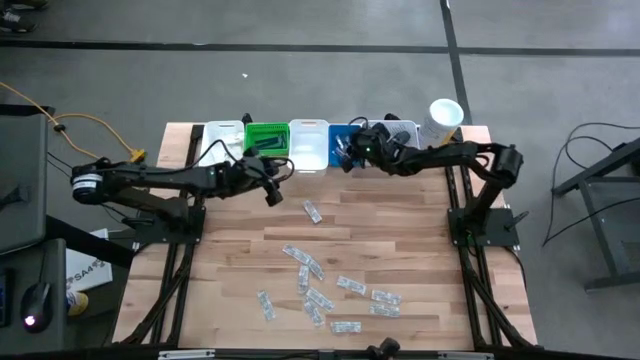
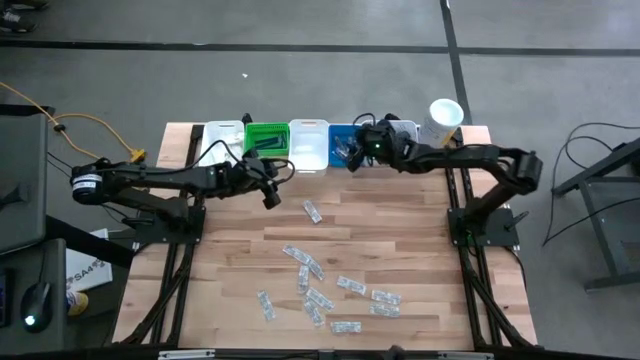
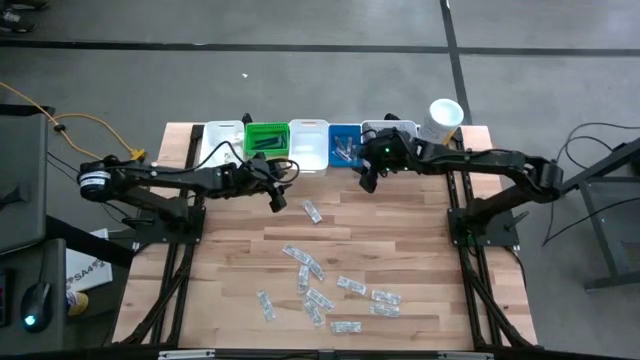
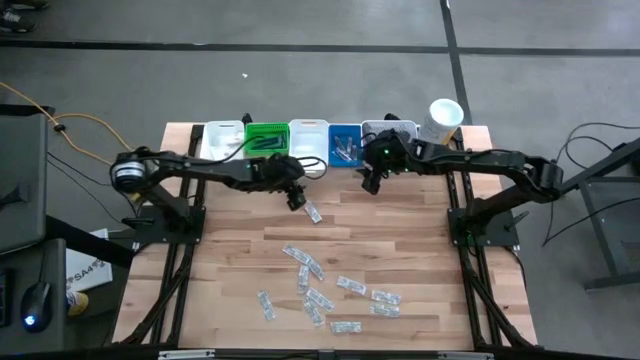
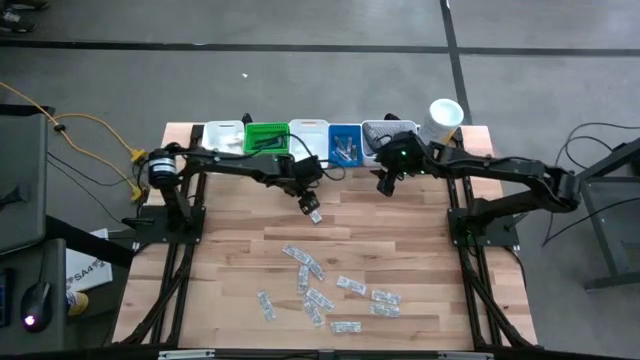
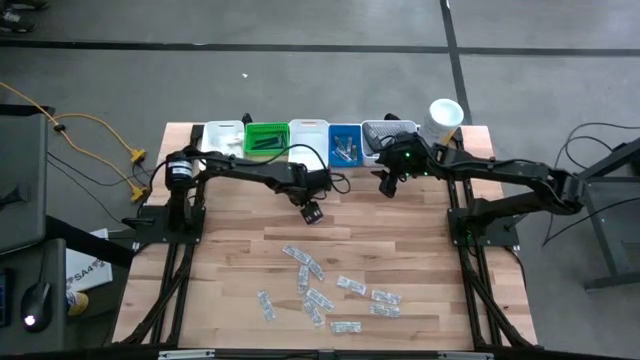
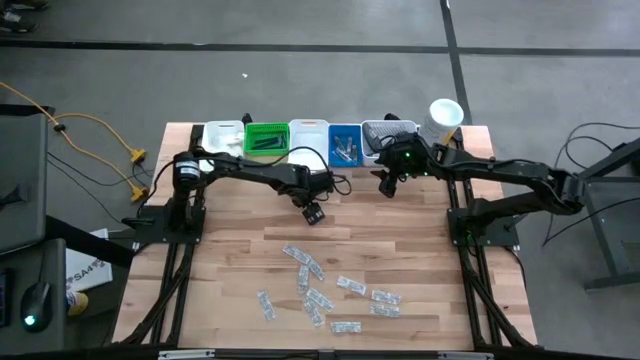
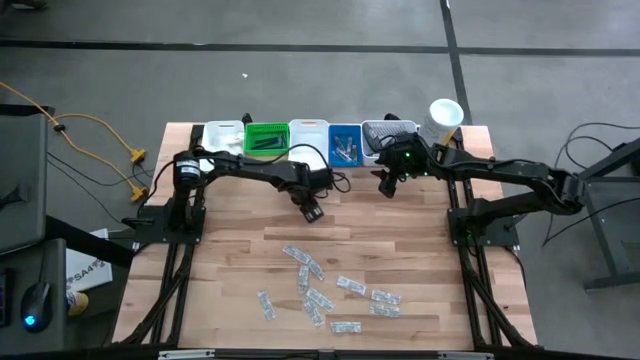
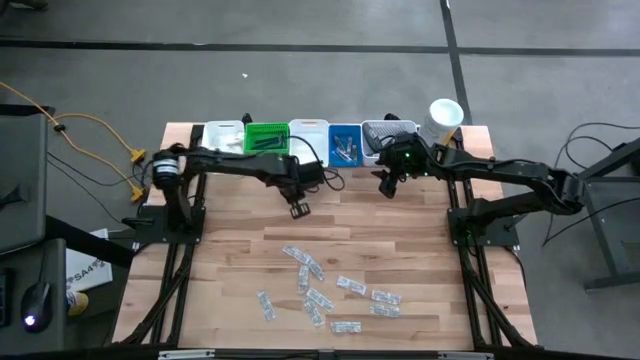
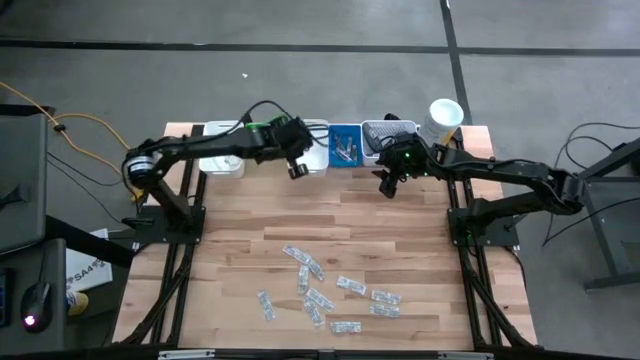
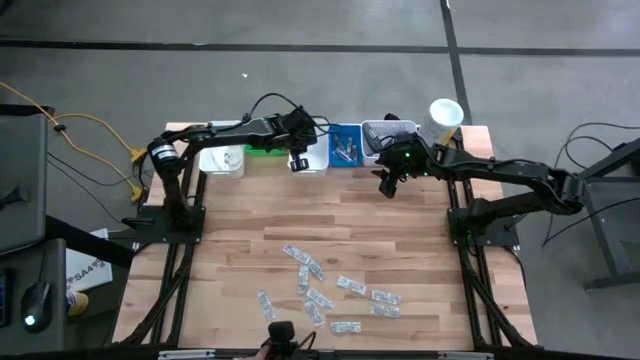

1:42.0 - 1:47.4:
Task: Pick & Place Travel size toiletries
Put the white bandage into the middle white bin

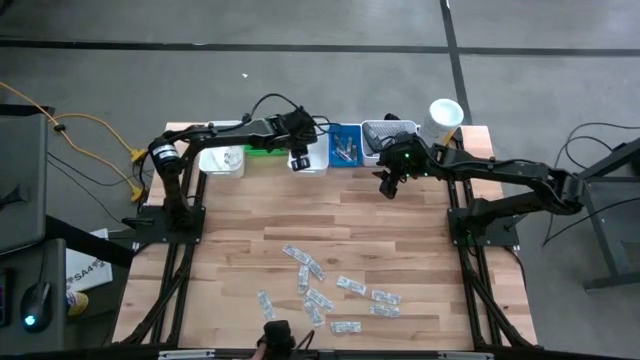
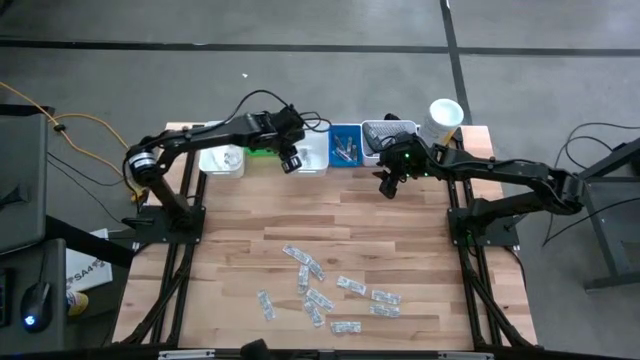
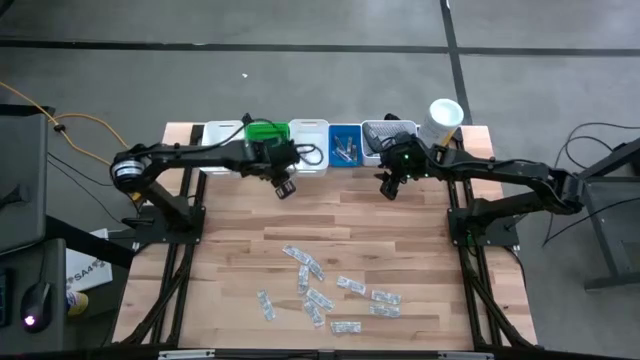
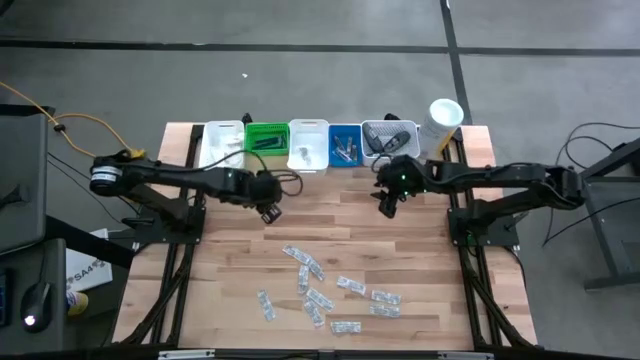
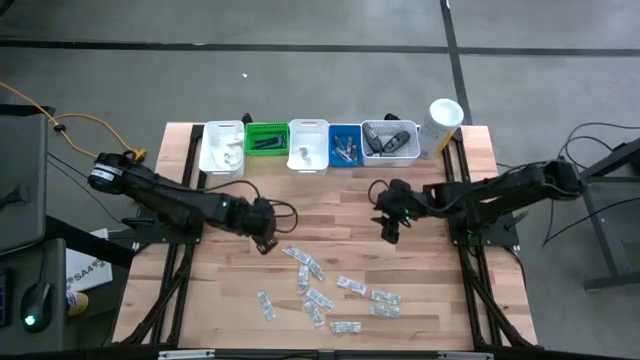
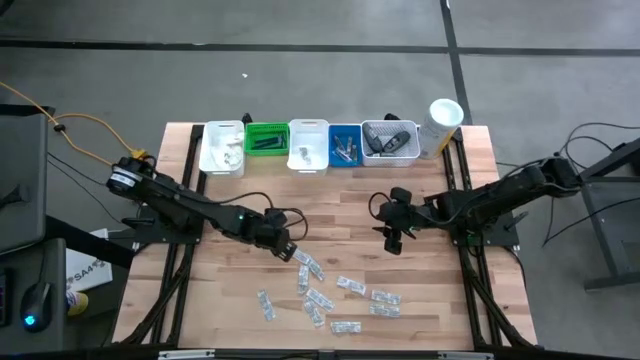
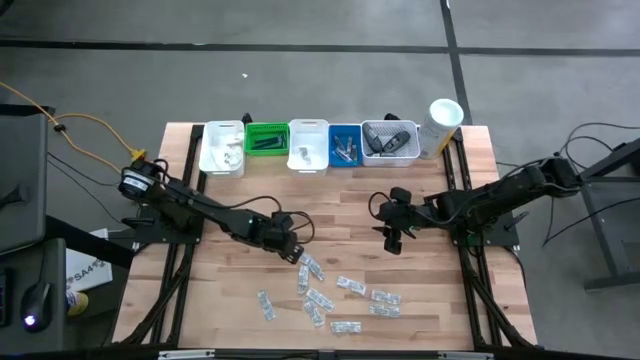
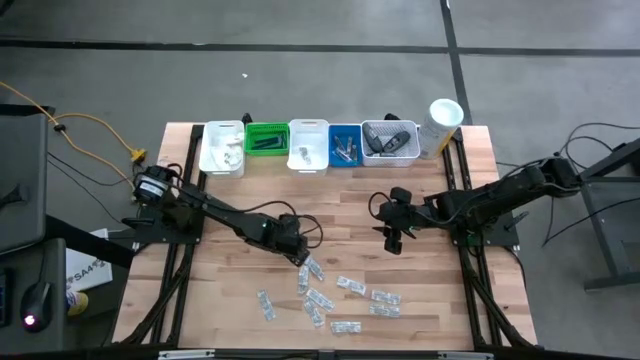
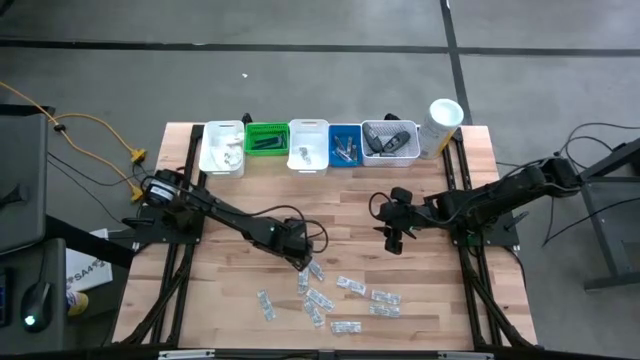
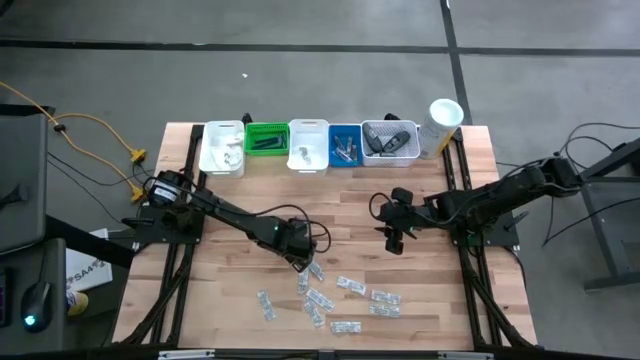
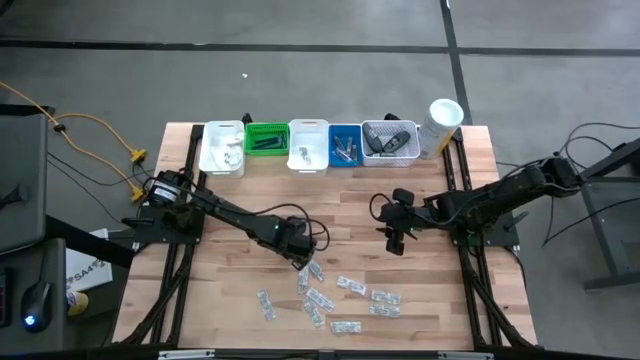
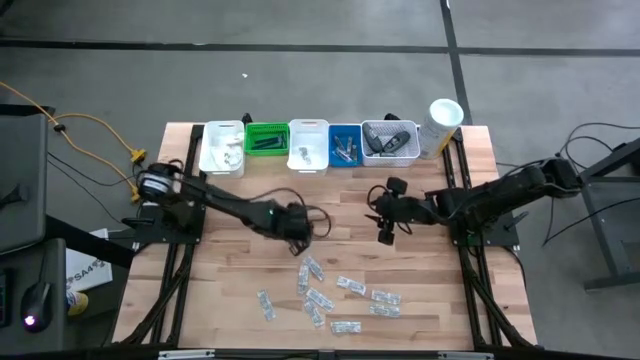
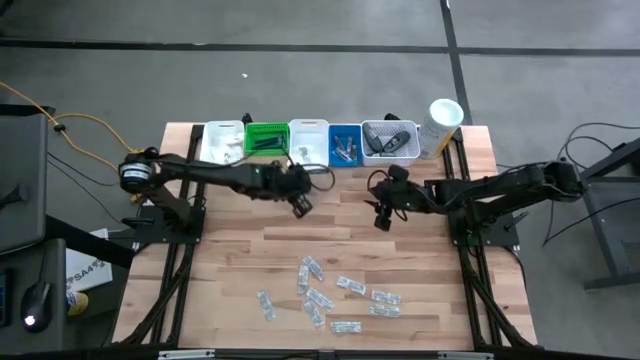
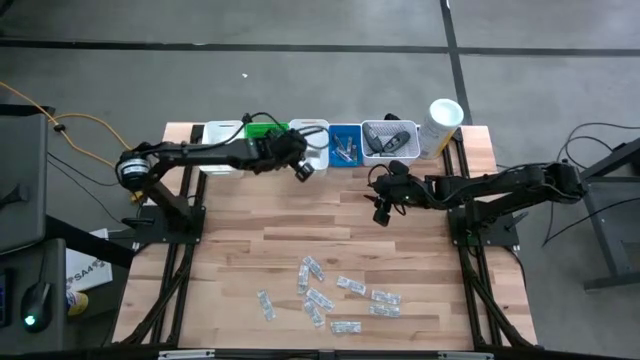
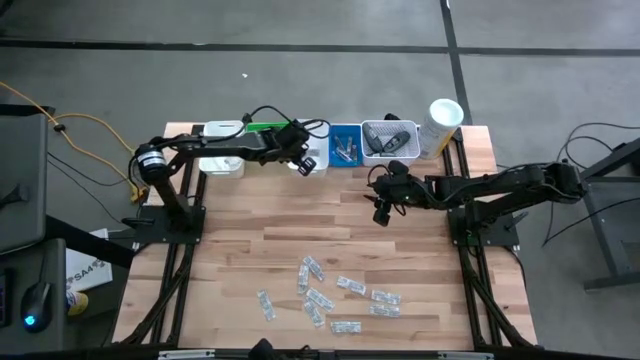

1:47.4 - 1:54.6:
Put the white bandage into the middle white bin

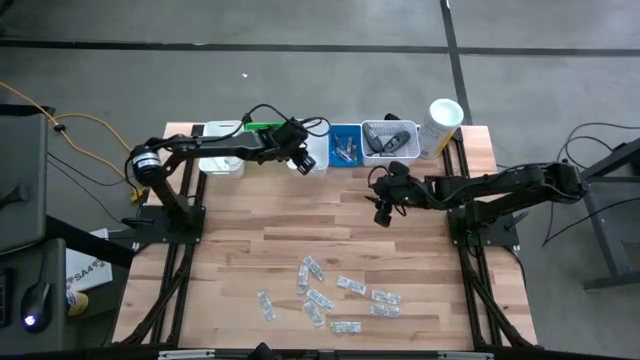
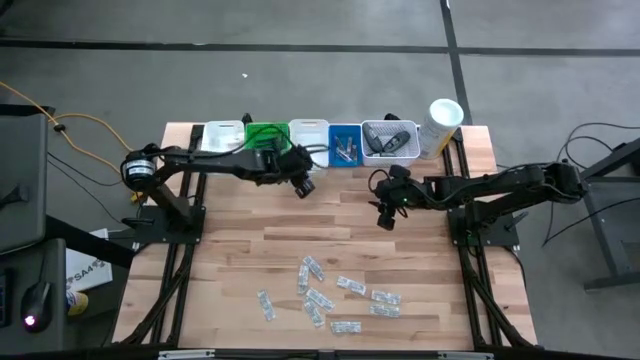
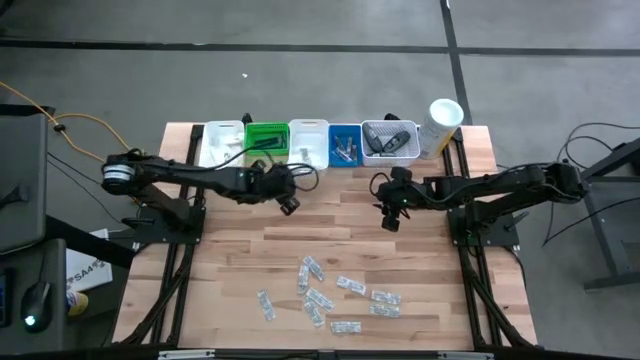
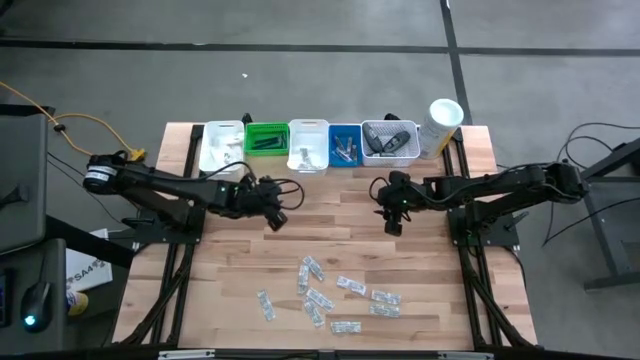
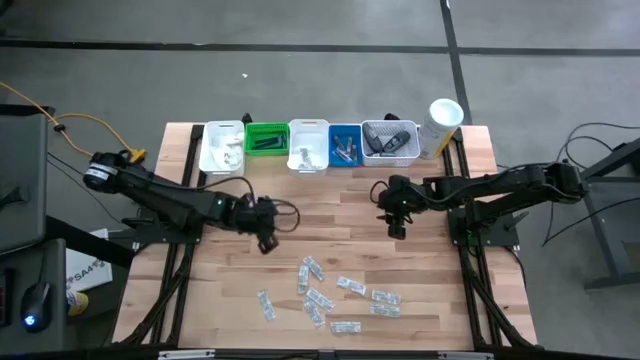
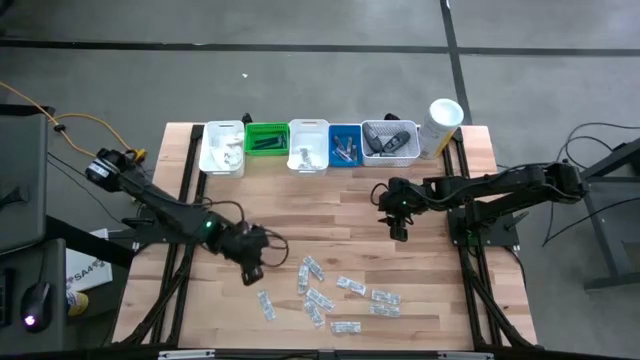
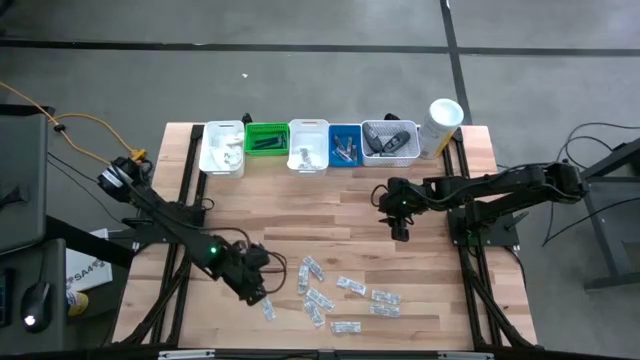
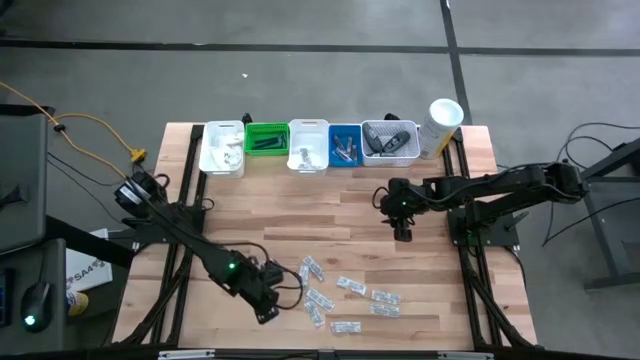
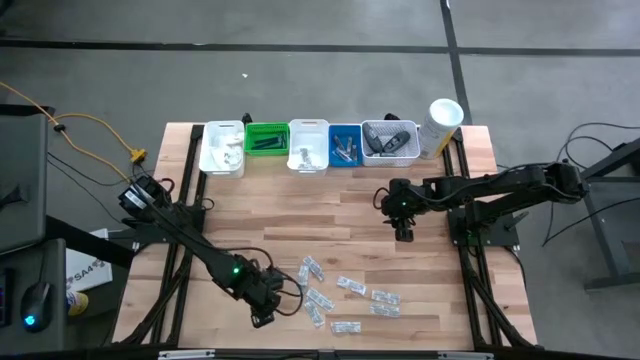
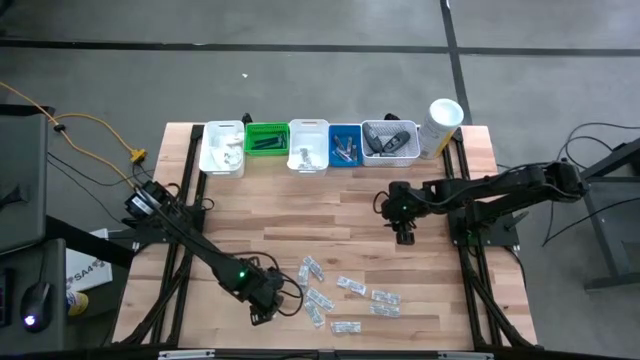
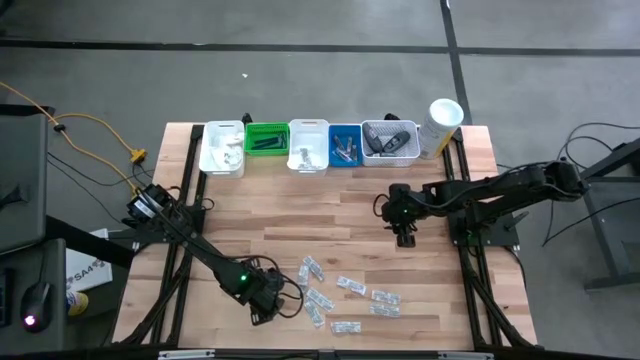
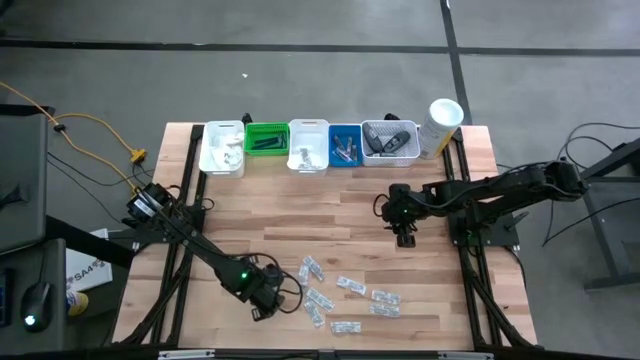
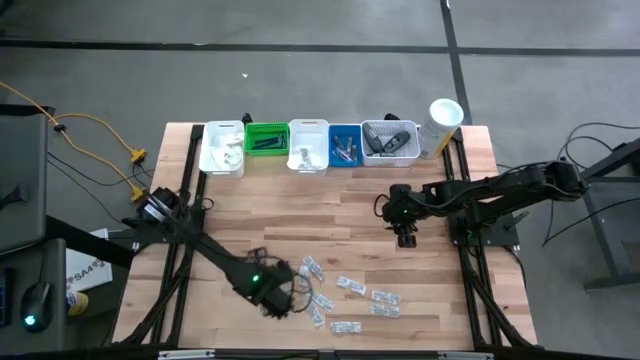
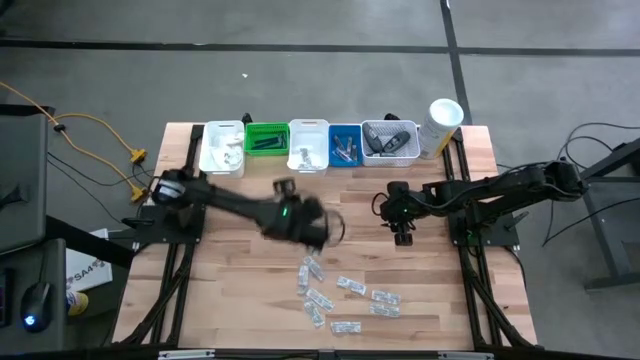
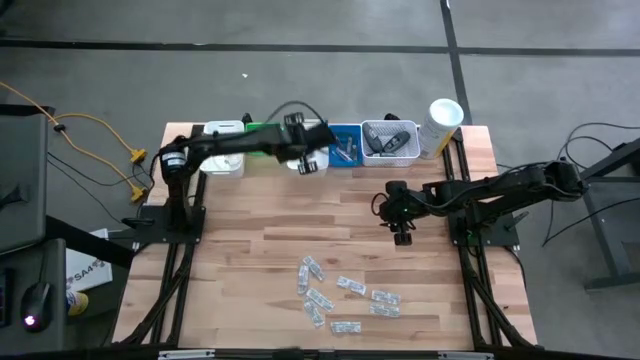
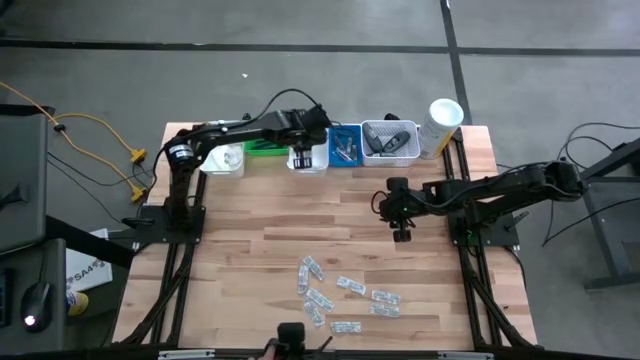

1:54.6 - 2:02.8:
Put the white bandage into the middle white bin
